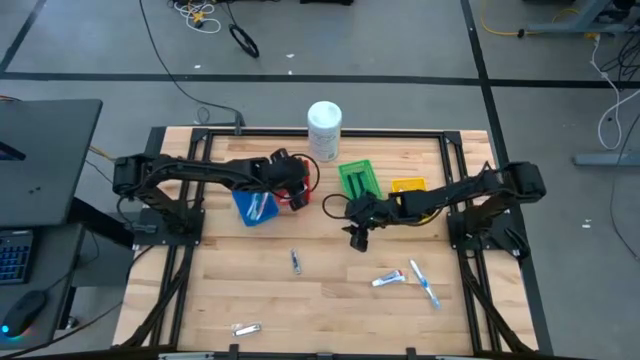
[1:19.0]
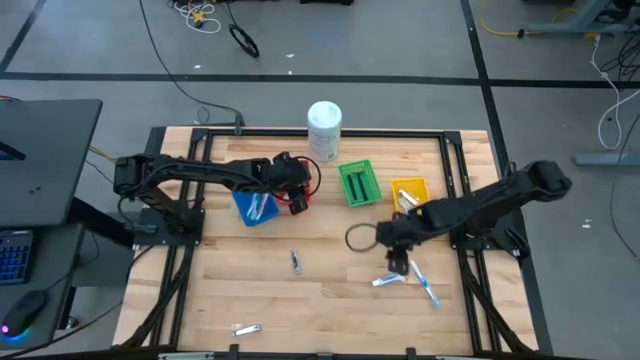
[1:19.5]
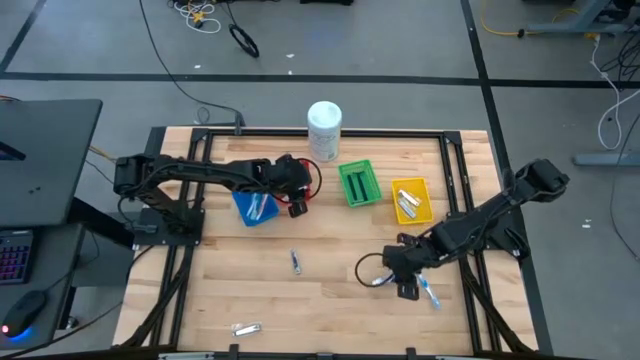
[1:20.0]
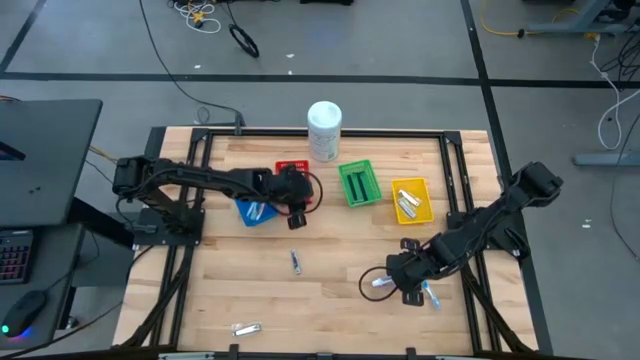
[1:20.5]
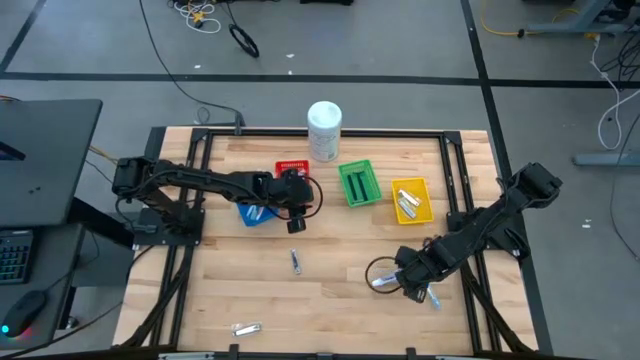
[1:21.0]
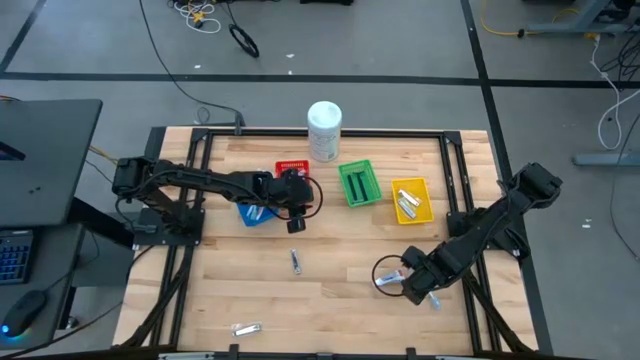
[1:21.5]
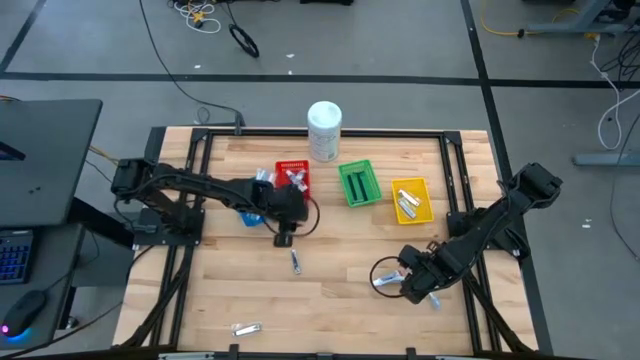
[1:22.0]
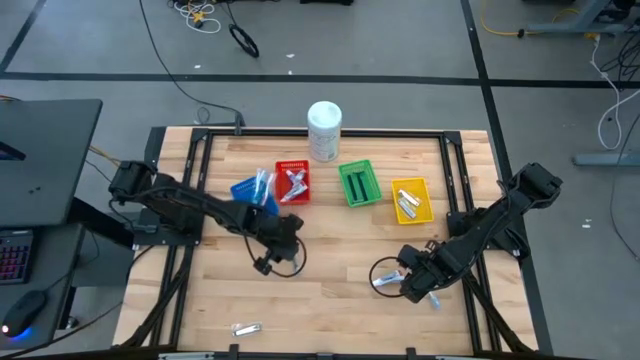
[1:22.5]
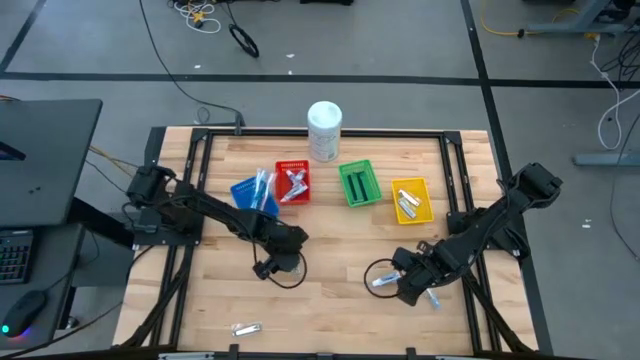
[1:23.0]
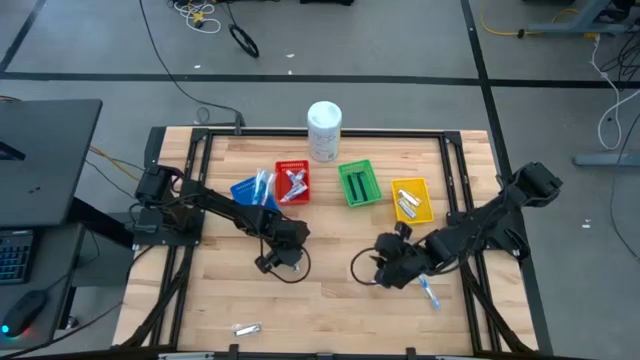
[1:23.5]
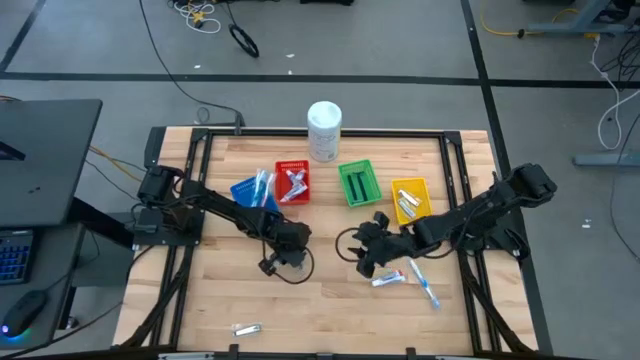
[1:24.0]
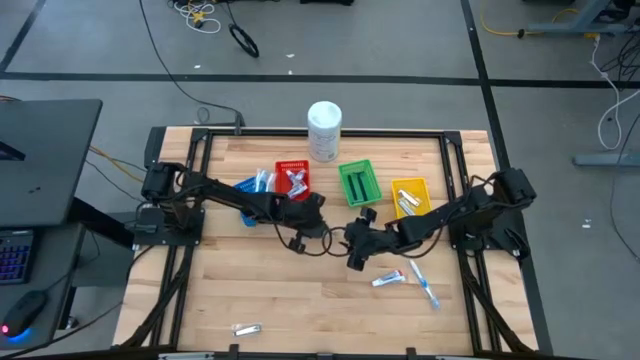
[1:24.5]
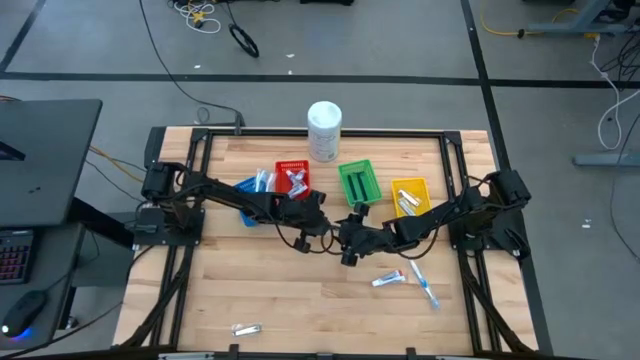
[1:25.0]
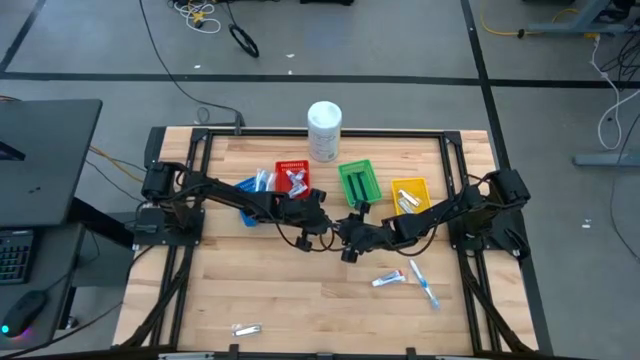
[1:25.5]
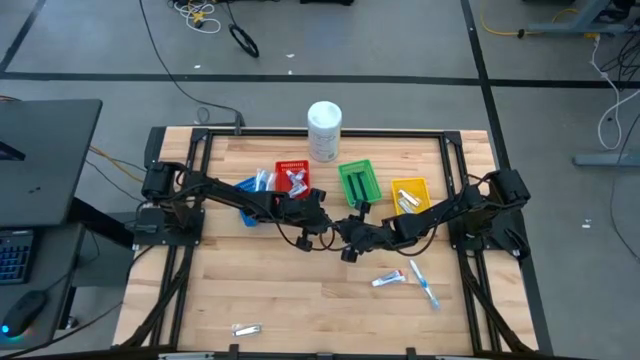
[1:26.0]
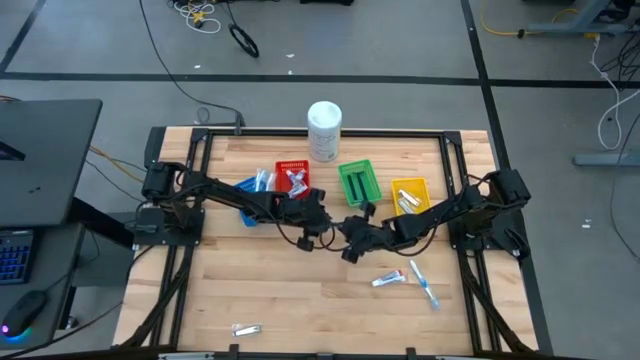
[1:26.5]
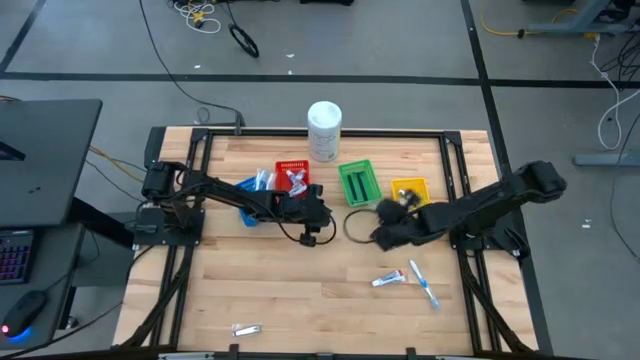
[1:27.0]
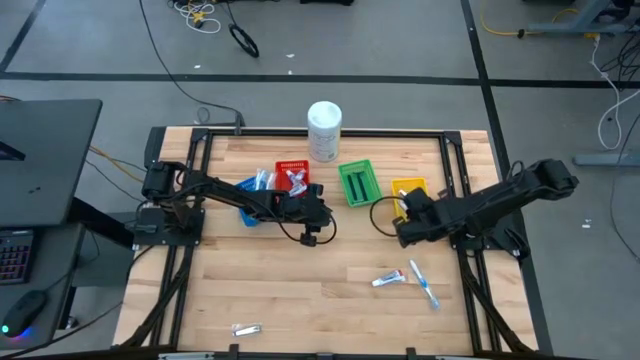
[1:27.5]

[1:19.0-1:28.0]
Task: Pick & Place Travel size toiletries
Put the nail cutter into the yellow bin

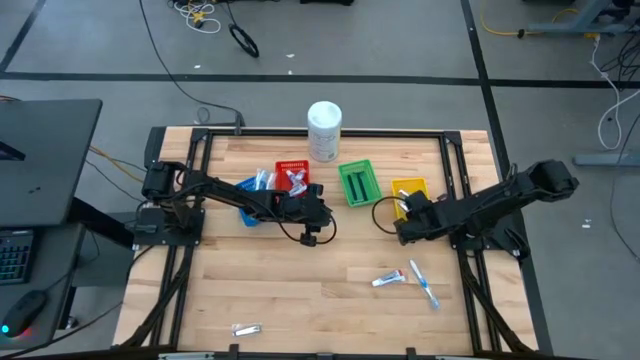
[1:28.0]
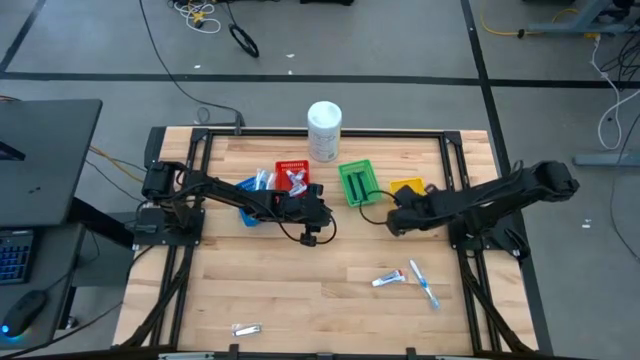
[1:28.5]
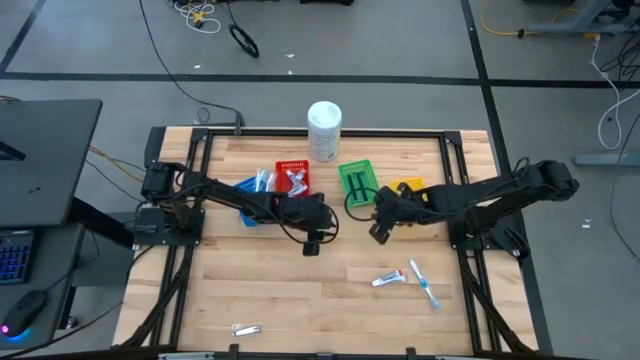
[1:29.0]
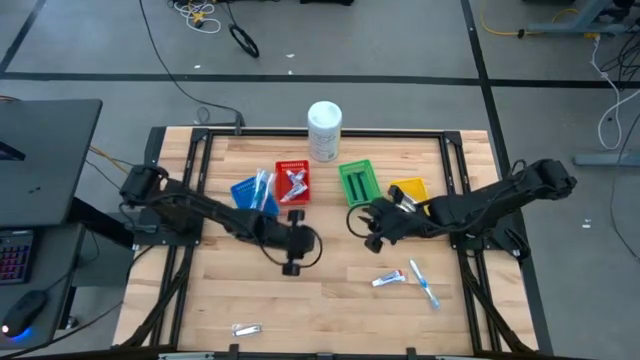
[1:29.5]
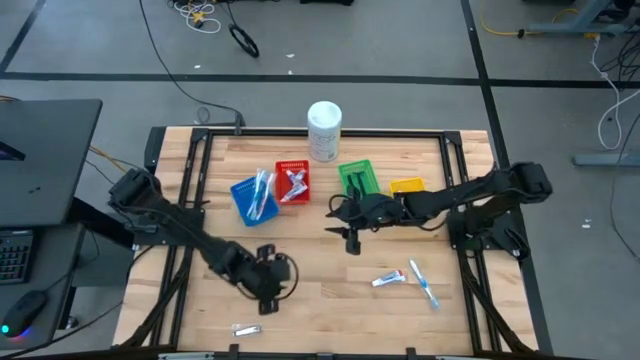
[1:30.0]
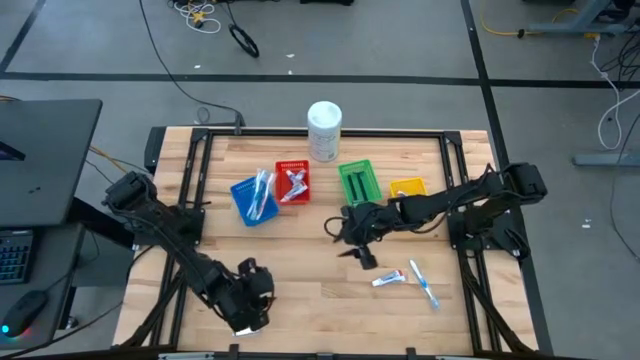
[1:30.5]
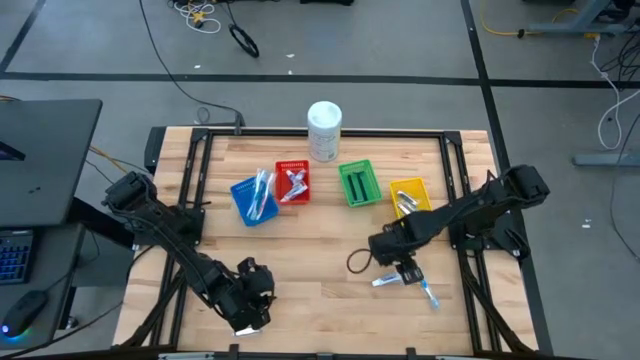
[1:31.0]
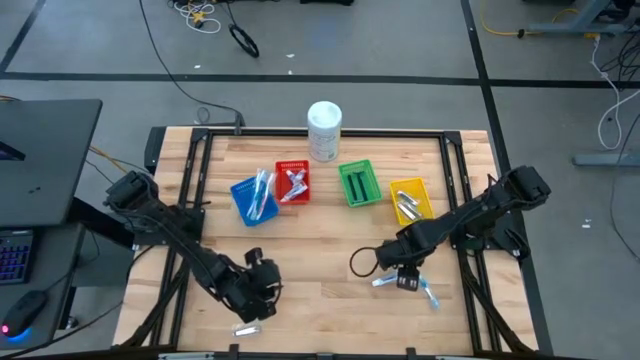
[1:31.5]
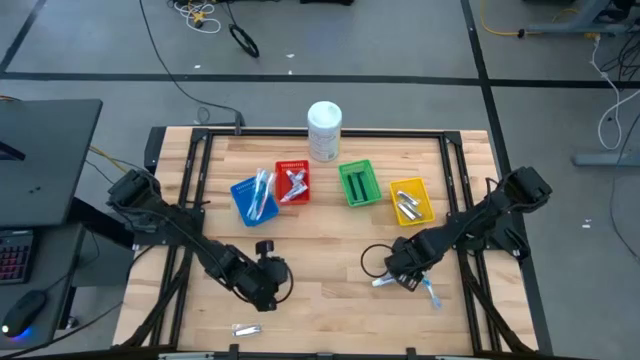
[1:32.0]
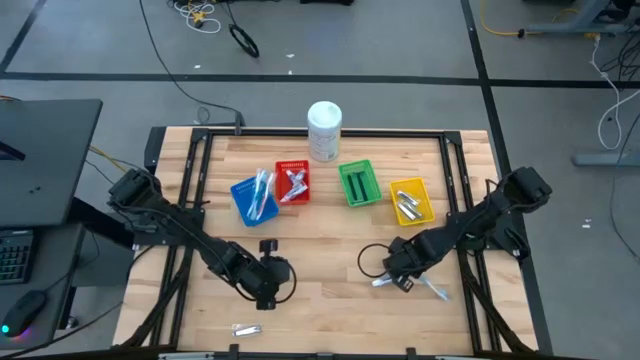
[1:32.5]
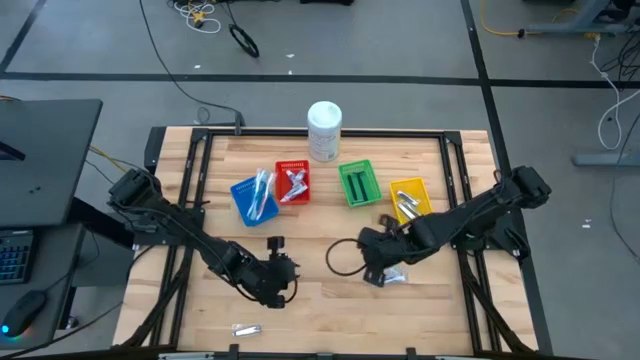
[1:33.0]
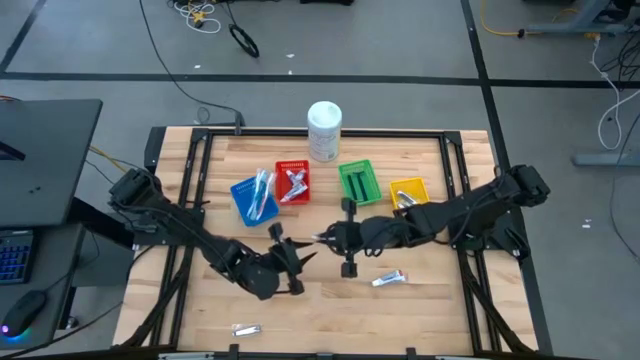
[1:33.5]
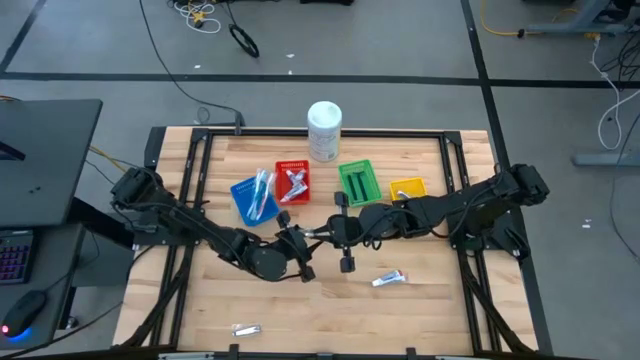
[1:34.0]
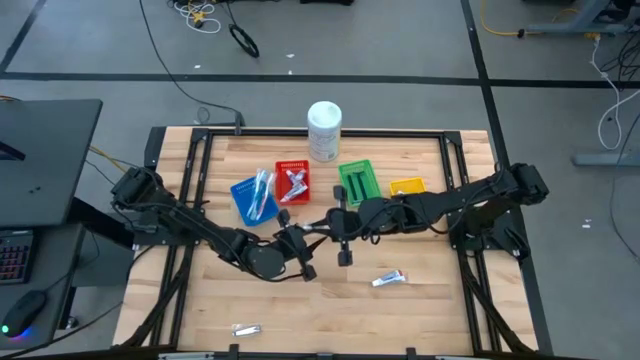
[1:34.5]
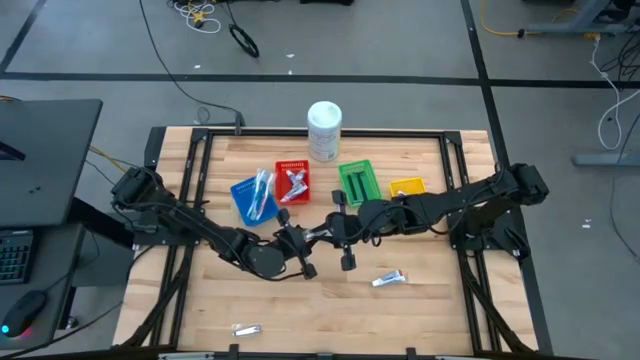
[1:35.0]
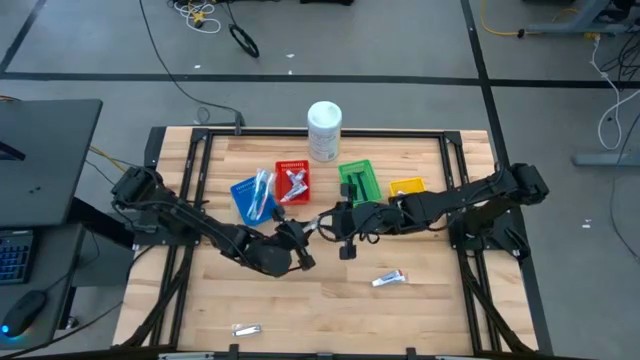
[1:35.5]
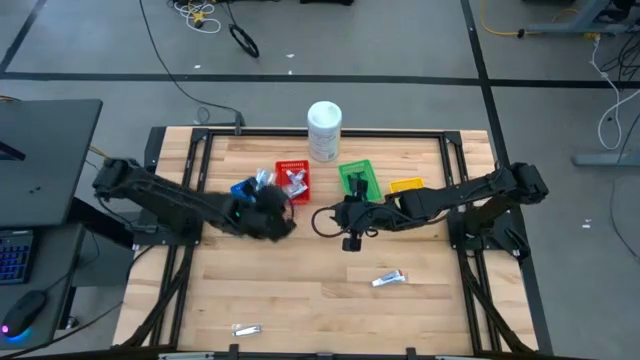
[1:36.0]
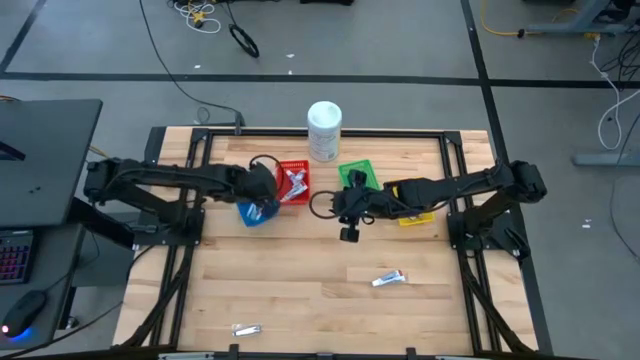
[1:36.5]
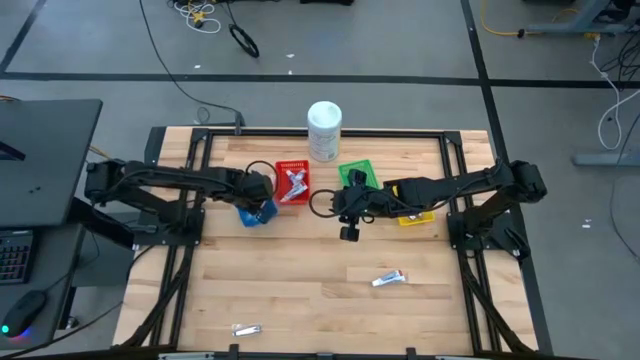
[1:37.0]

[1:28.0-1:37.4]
Put the blue toothbrush into the blue bin

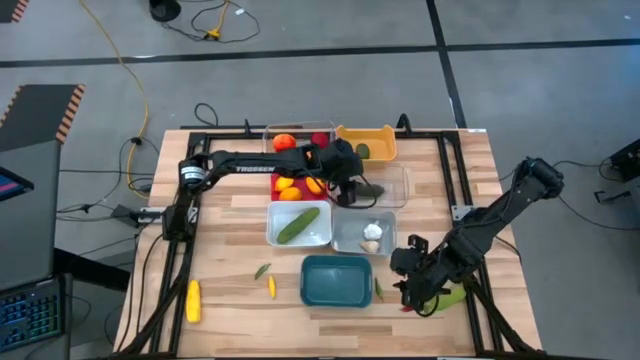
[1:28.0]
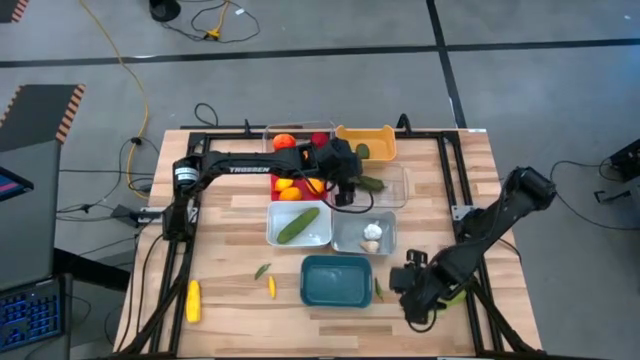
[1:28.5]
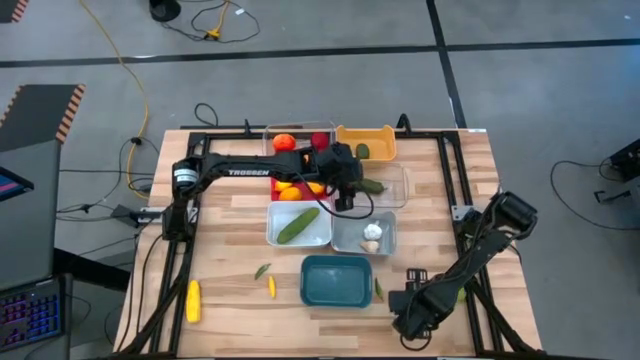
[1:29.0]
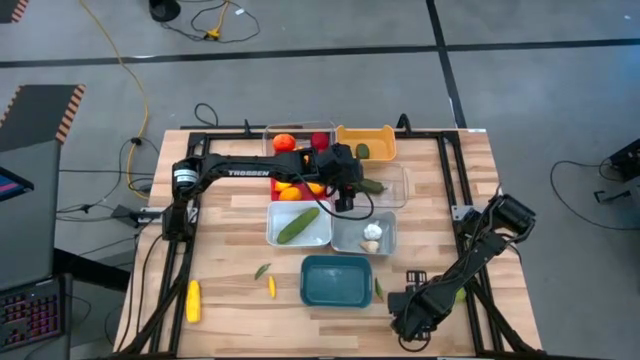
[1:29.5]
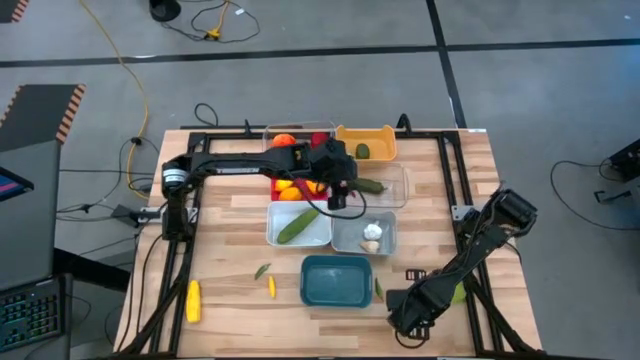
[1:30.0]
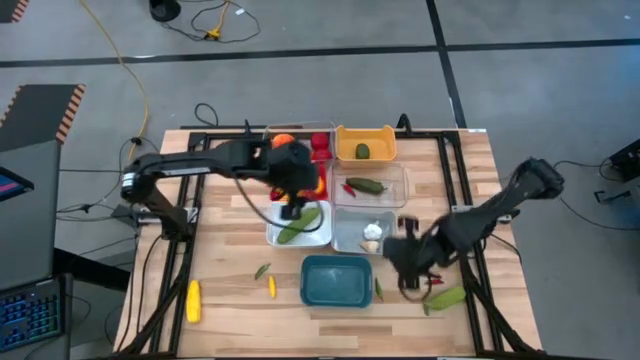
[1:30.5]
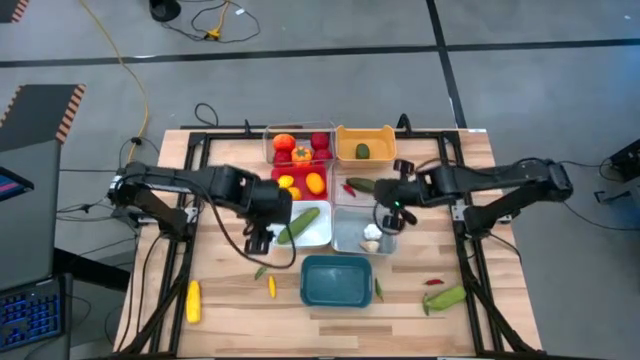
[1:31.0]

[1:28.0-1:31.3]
Task: Sort produce into baskets
Put the bottom red chili pepper into the bottom transparent bin
